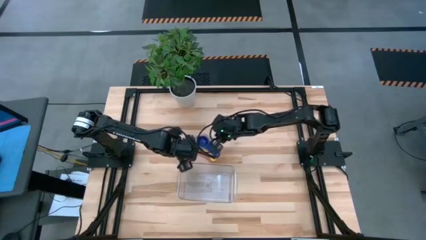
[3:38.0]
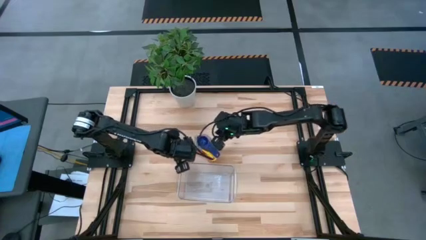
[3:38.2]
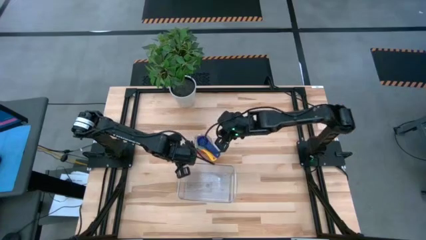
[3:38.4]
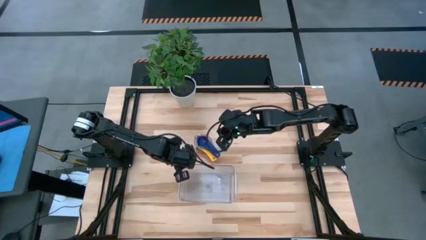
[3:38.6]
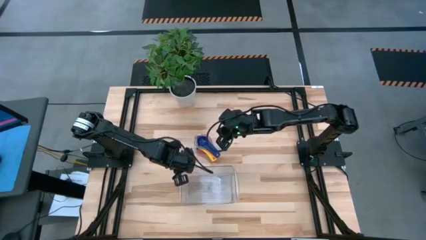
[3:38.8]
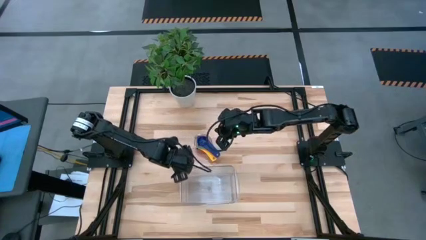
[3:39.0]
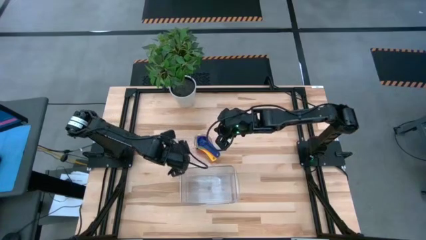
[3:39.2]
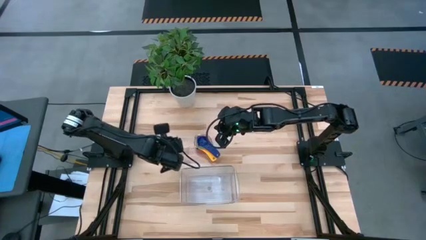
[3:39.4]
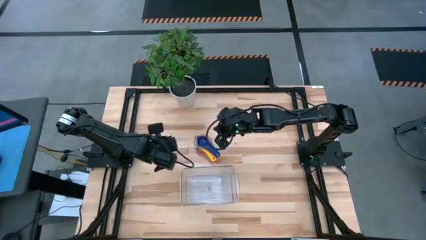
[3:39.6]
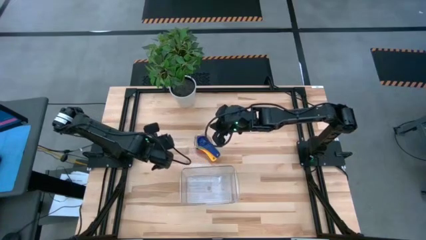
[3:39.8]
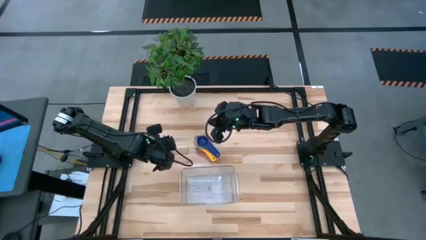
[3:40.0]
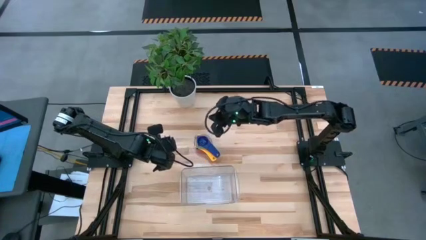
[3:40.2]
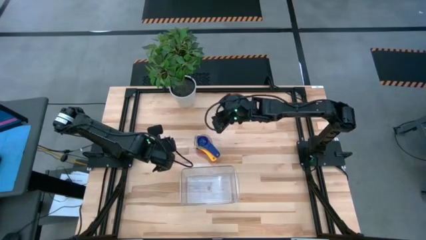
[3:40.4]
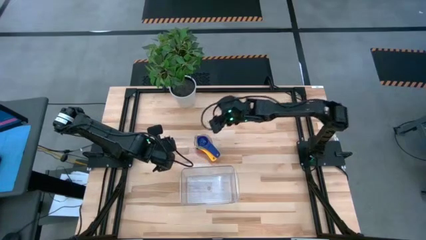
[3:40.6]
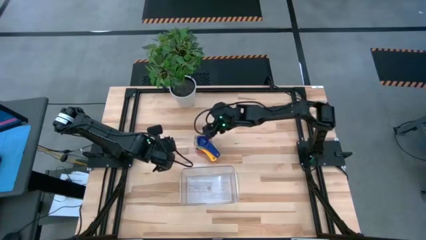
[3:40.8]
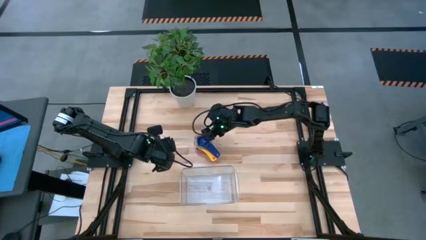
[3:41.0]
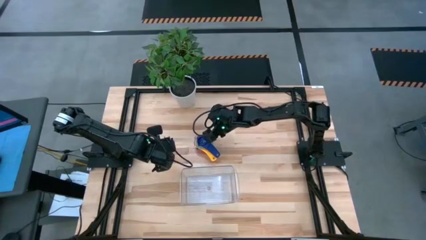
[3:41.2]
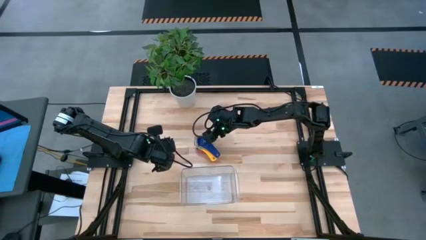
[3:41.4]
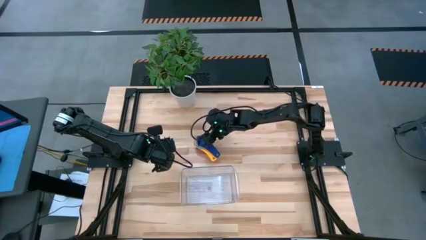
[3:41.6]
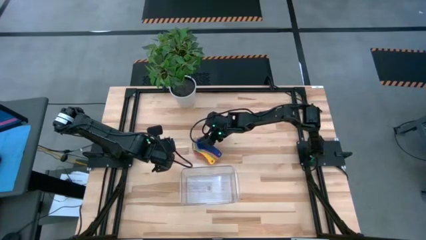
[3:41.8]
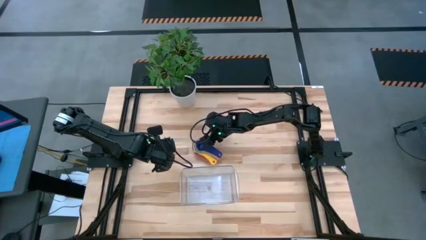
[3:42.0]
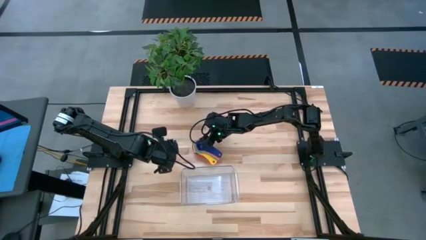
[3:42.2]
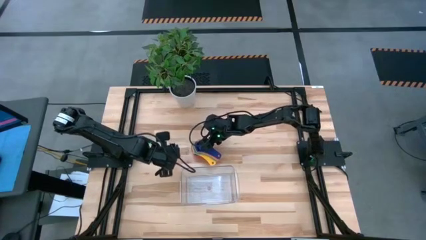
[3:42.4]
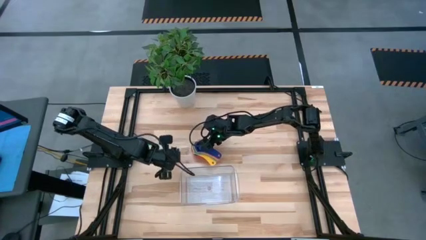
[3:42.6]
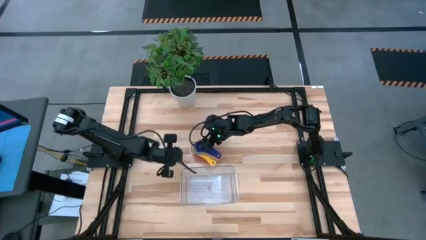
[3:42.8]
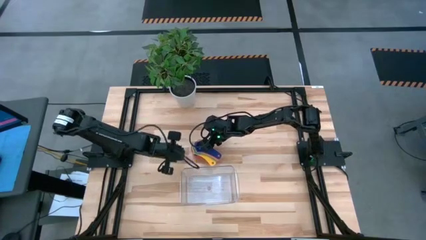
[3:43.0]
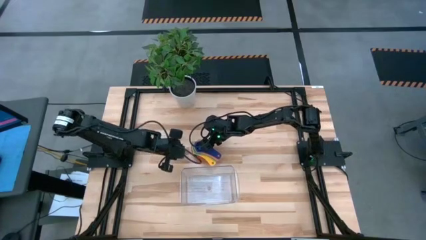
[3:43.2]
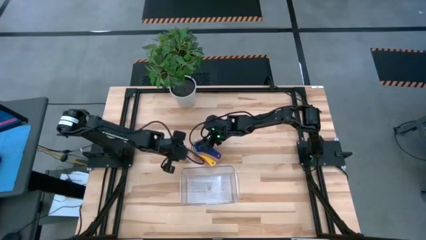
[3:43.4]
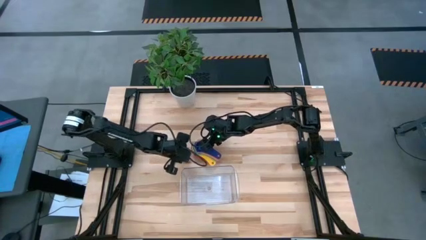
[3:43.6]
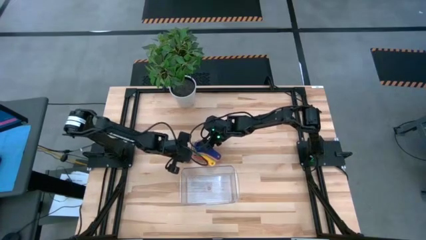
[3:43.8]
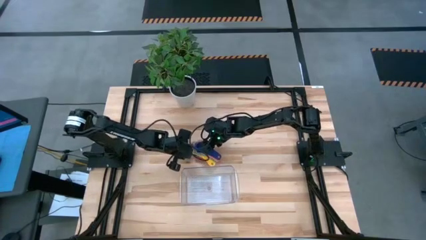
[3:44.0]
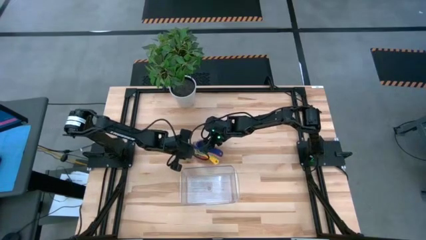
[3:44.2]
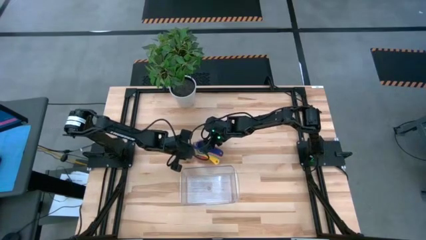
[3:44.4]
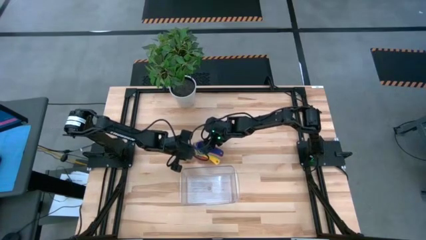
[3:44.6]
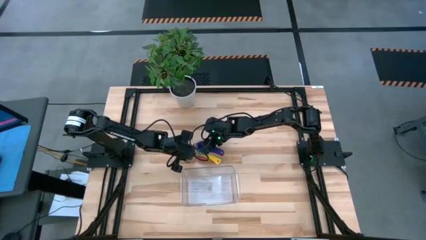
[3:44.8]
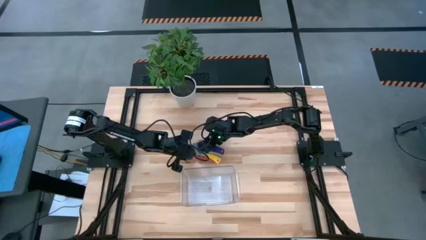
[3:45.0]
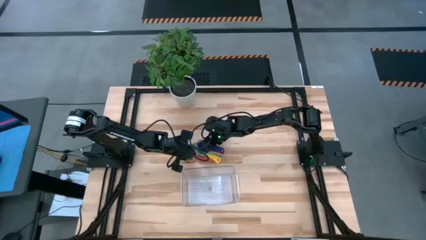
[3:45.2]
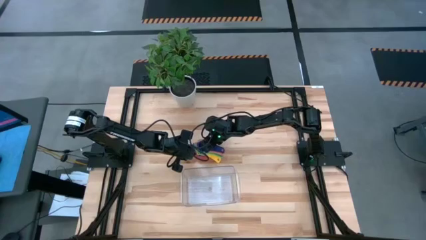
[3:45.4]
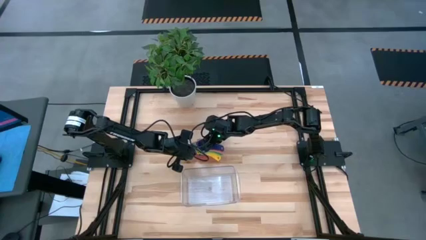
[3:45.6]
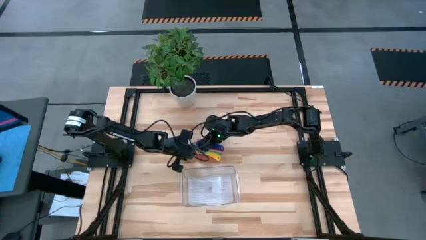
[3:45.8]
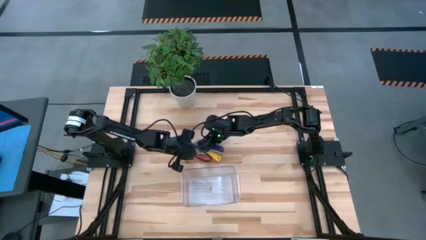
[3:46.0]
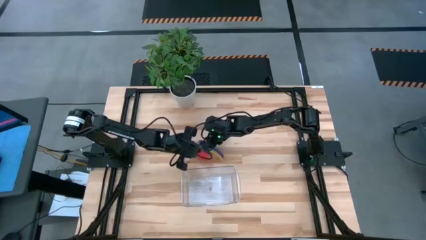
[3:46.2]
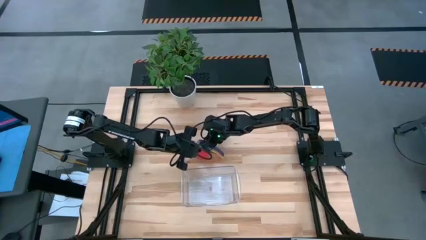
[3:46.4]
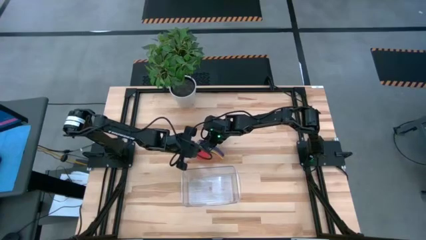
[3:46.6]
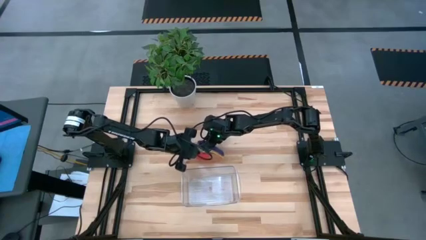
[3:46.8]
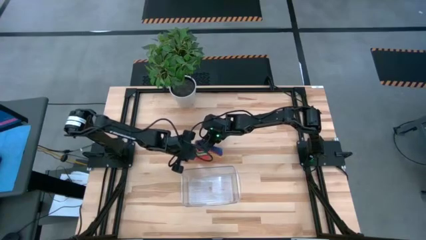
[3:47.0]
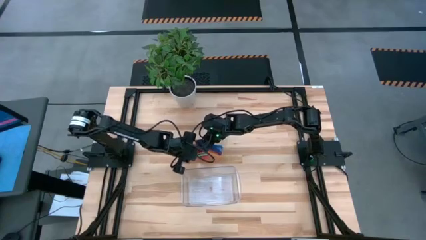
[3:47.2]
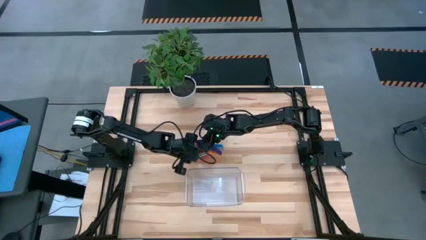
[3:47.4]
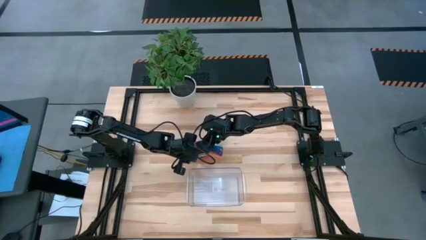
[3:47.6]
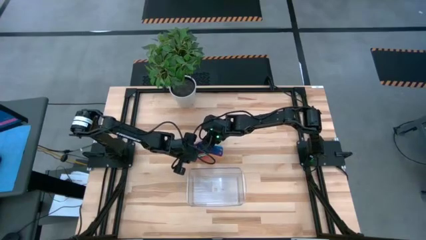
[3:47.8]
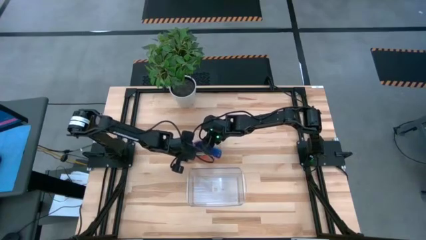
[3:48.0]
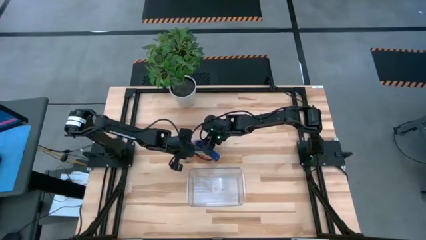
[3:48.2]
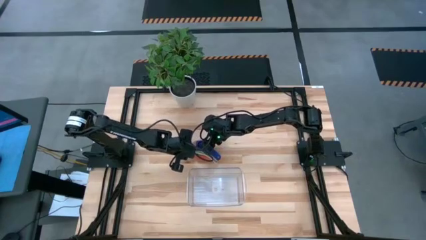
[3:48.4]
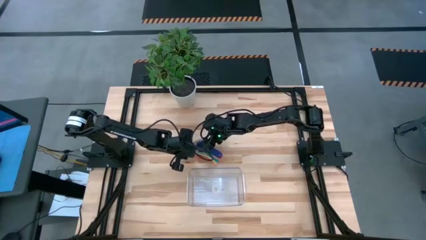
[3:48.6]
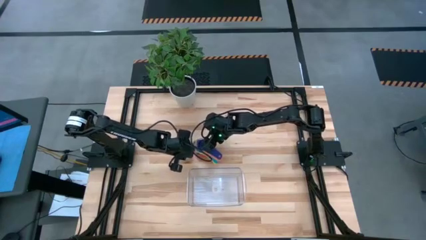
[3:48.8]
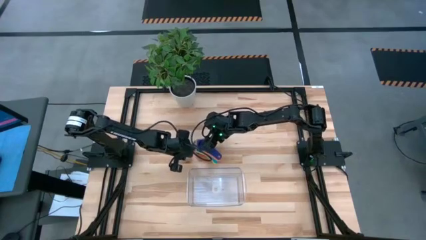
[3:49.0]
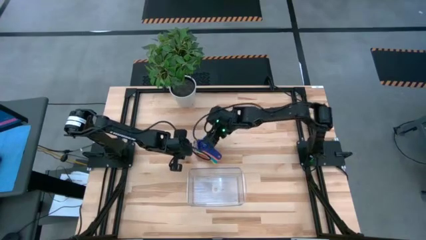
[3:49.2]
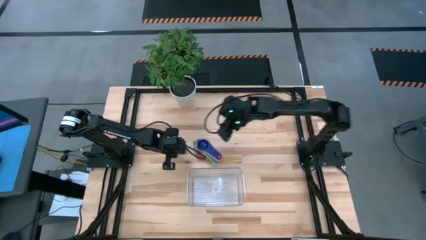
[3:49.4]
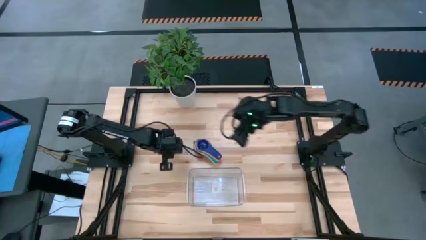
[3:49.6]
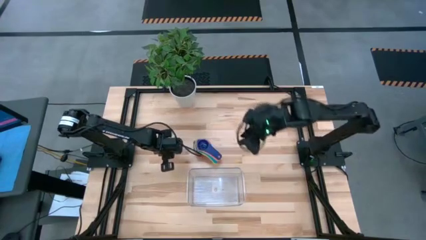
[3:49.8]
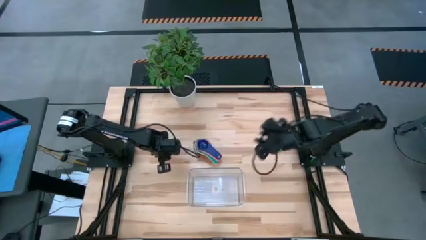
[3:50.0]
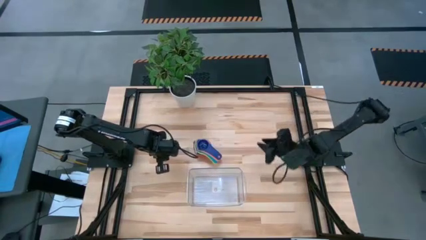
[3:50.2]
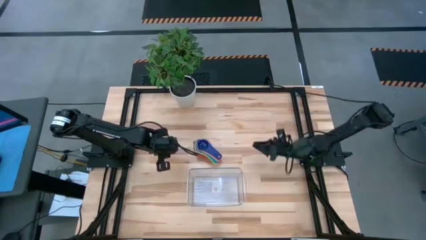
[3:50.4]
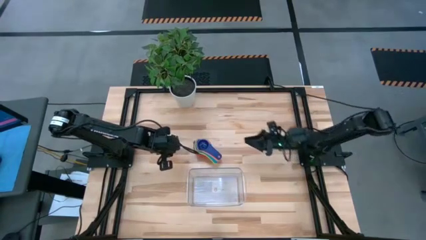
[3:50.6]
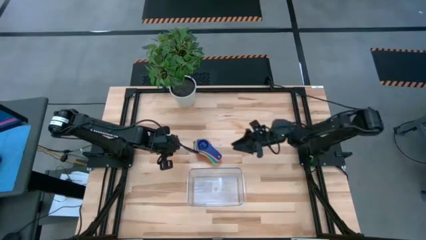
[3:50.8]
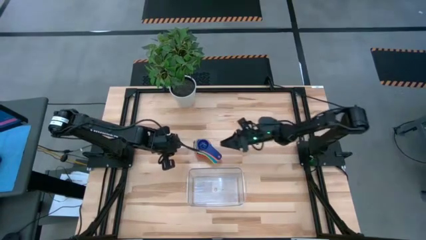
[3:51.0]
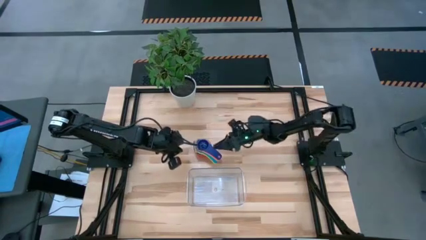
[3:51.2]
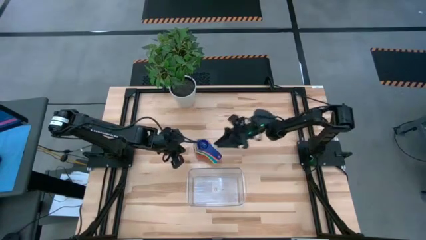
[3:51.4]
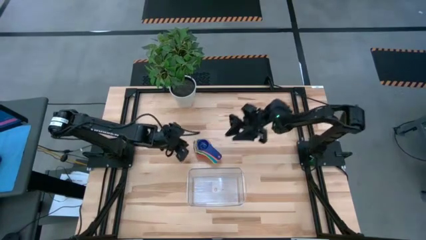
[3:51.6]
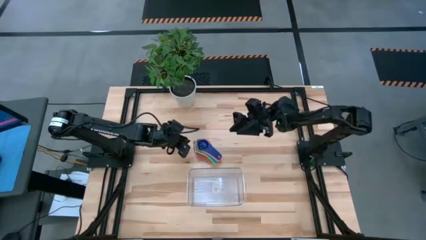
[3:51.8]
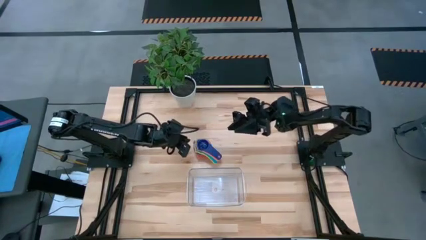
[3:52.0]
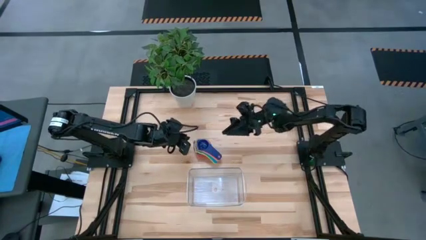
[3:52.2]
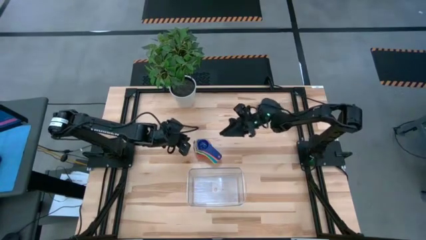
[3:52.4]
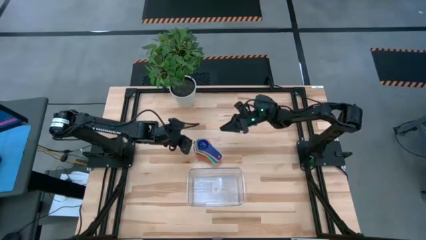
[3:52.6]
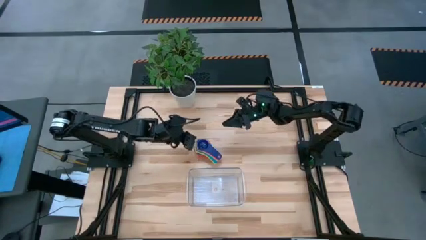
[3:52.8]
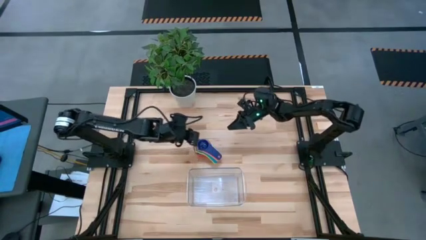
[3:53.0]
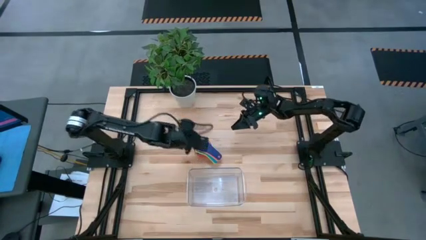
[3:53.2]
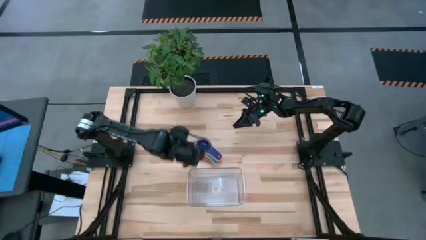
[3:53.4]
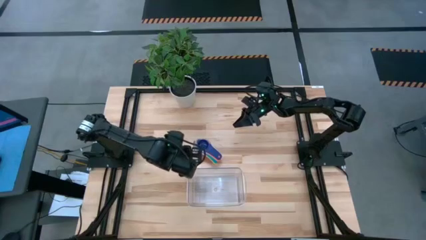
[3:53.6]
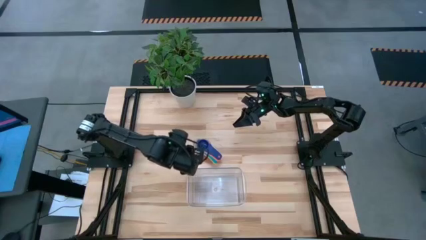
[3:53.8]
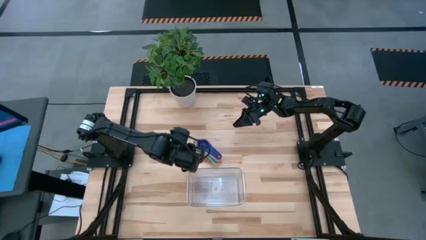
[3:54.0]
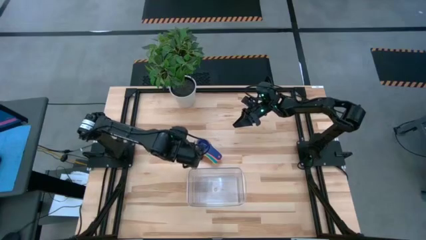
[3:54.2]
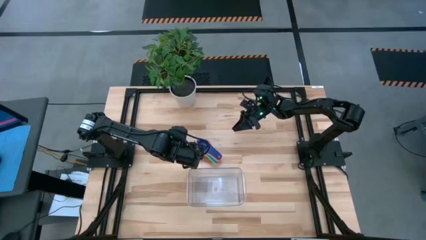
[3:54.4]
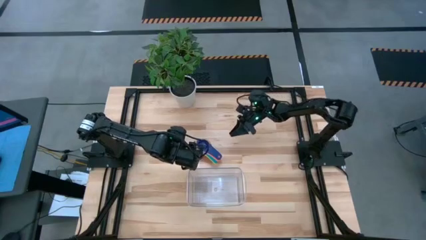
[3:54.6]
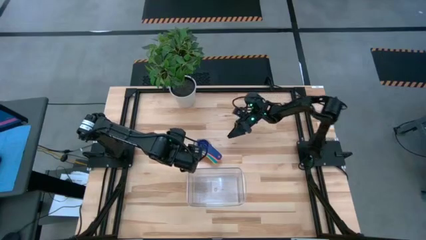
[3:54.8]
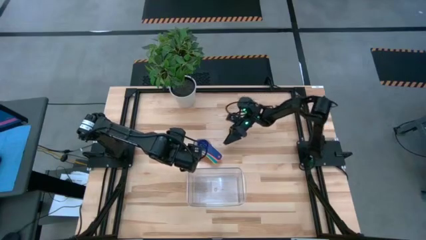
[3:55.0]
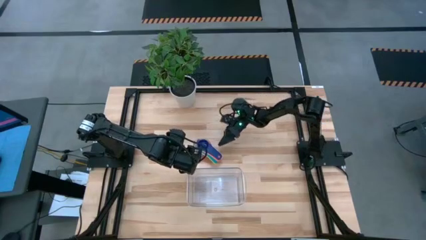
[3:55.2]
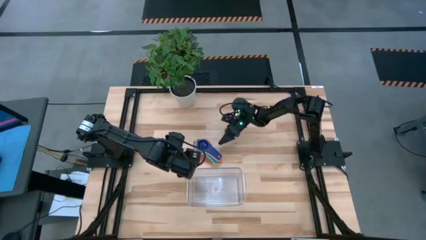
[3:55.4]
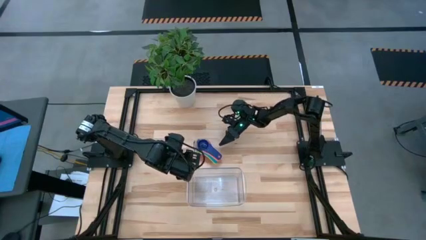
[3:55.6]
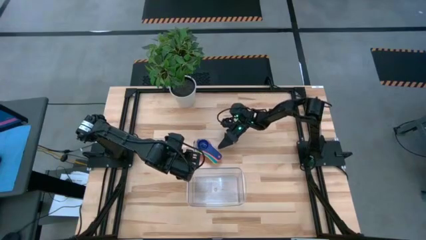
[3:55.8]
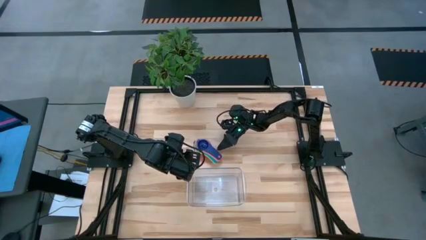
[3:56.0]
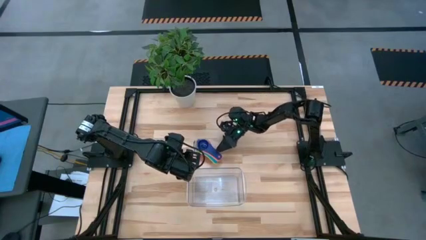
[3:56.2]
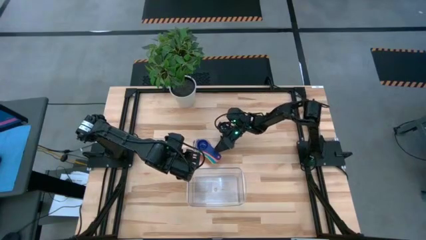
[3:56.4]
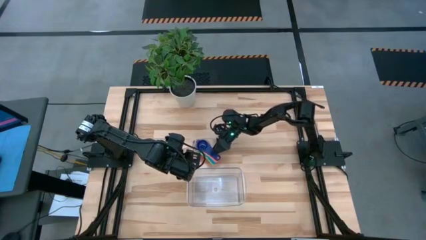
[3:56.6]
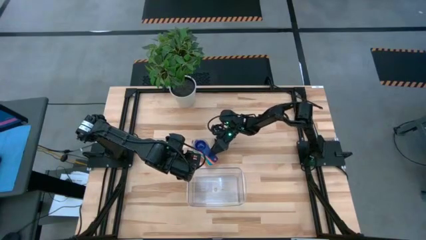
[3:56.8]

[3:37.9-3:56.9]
Task: Nest measuring cups in basket
Put the colored stacked measuring cups into the transparent bin
